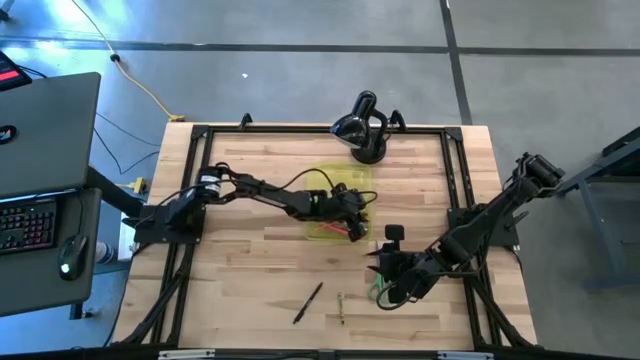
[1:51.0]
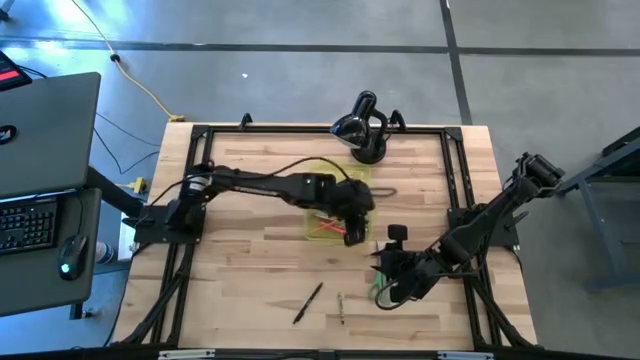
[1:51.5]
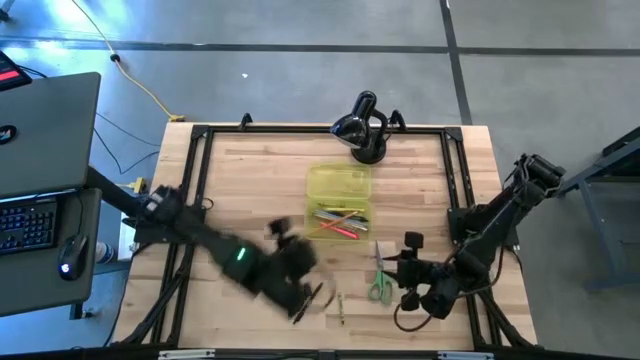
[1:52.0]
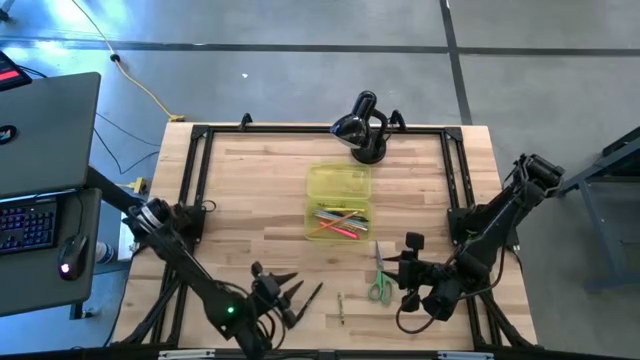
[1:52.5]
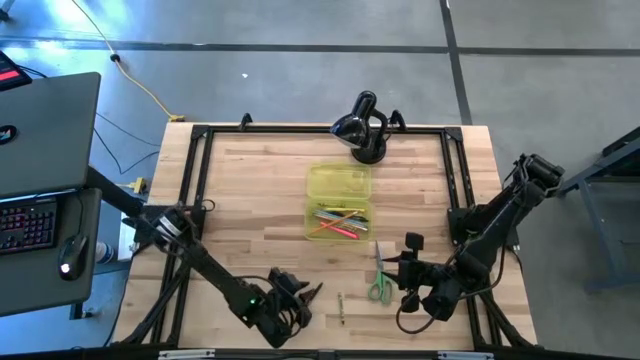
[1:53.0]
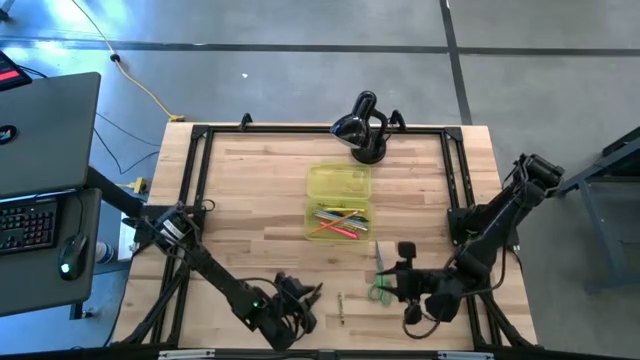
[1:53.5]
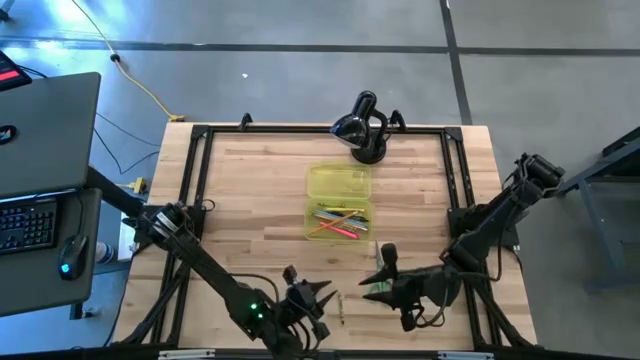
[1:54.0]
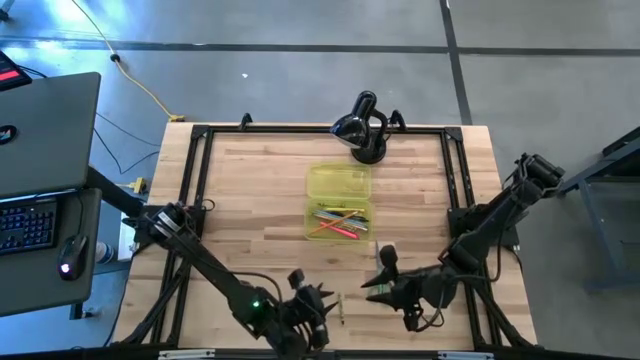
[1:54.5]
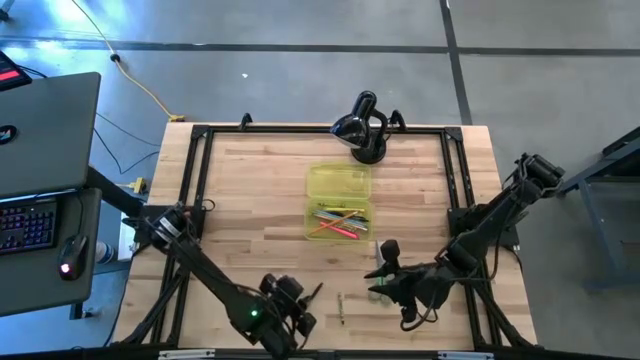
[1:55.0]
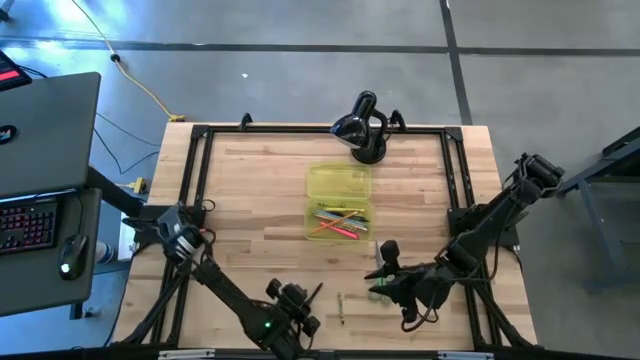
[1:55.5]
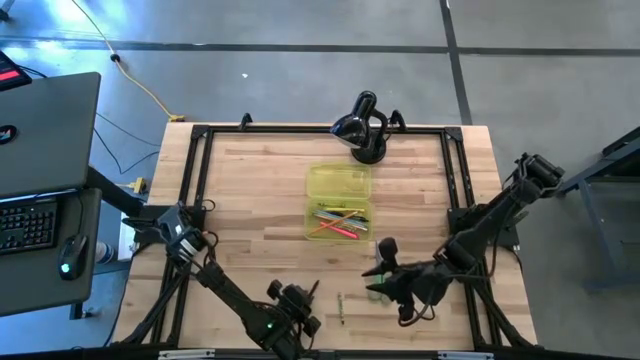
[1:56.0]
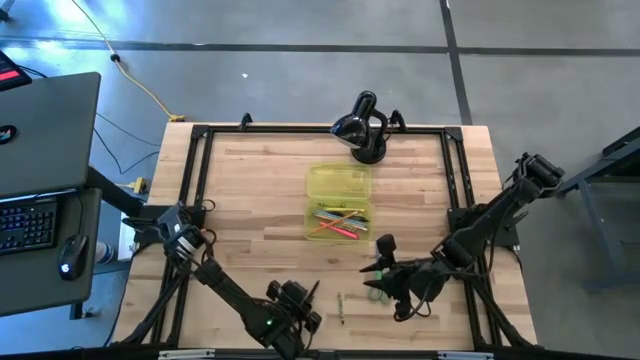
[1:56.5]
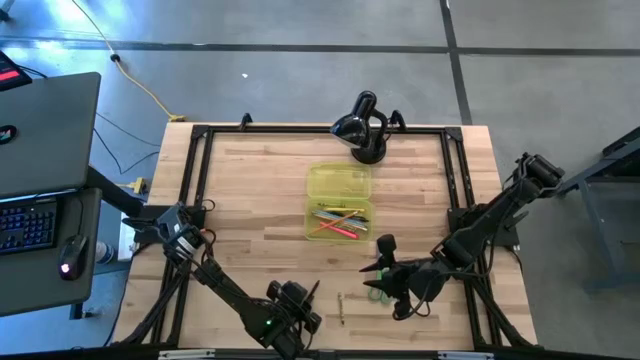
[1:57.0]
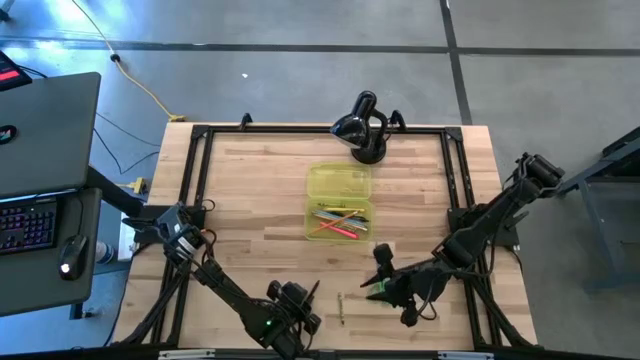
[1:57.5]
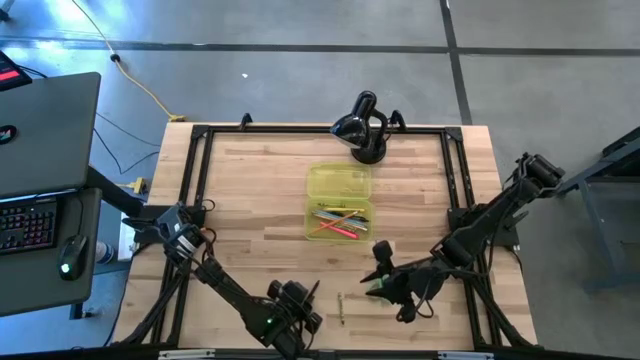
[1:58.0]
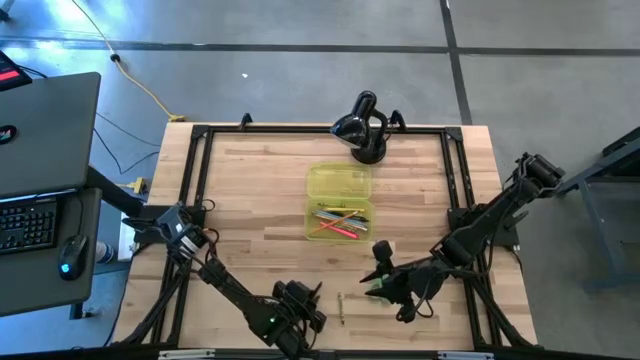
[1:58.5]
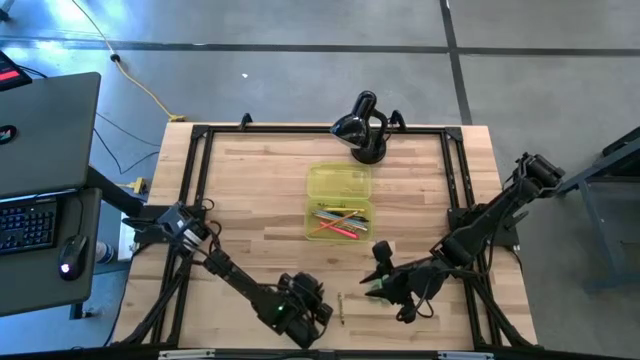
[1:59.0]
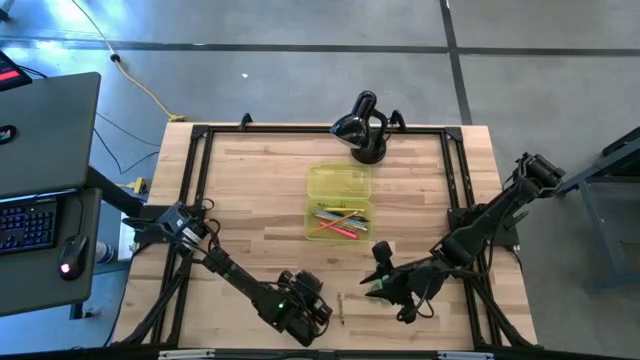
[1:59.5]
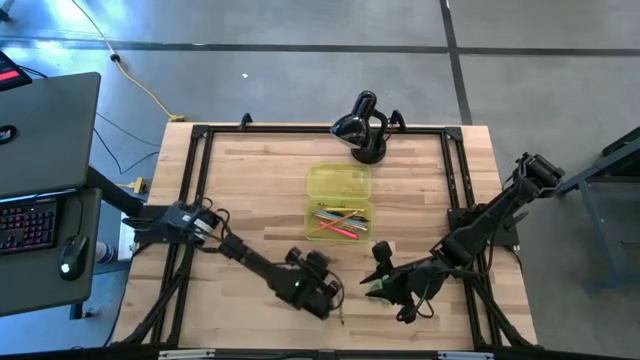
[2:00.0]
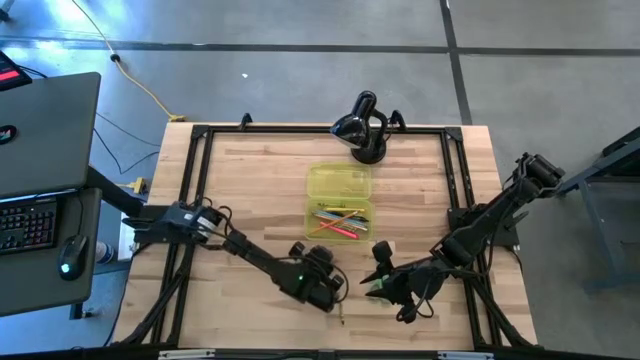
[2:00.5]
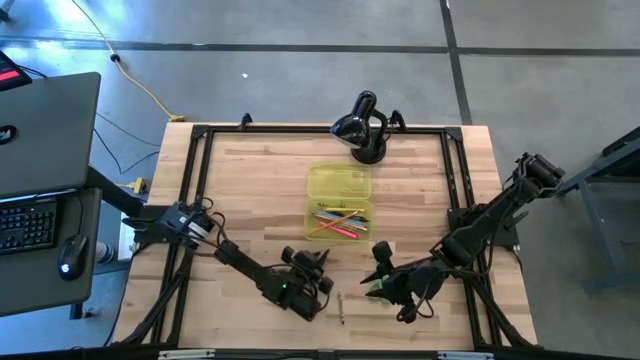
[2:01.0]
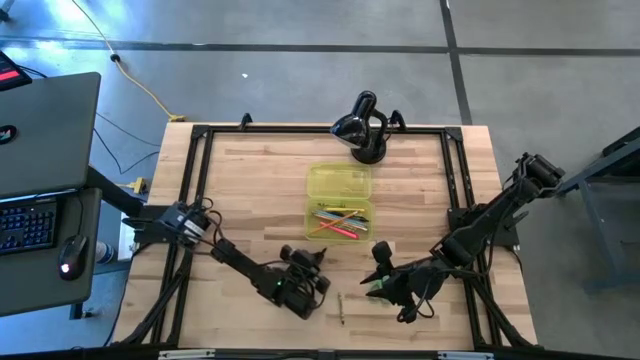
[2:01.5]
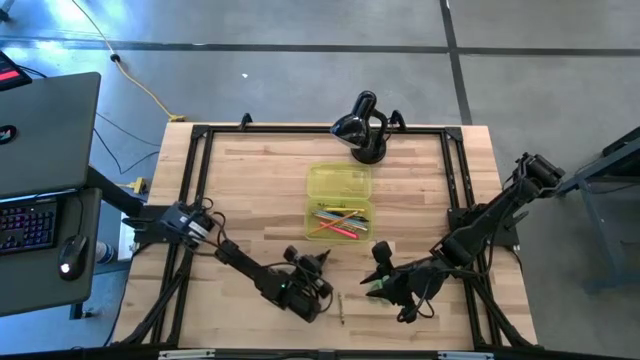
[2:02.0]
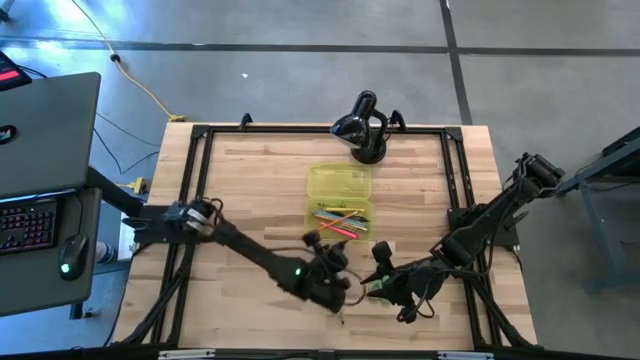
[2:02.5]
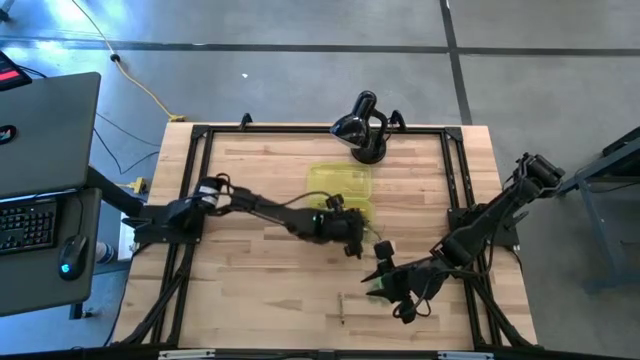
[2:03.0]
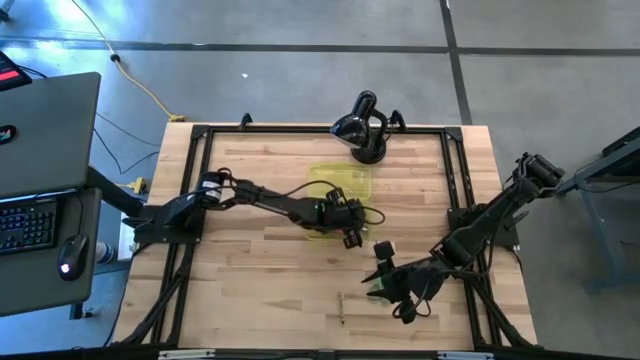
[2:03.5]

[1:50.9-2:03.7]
Task: Pick & place school supplies into a supply box
Put the black pen into the yellow school supply box

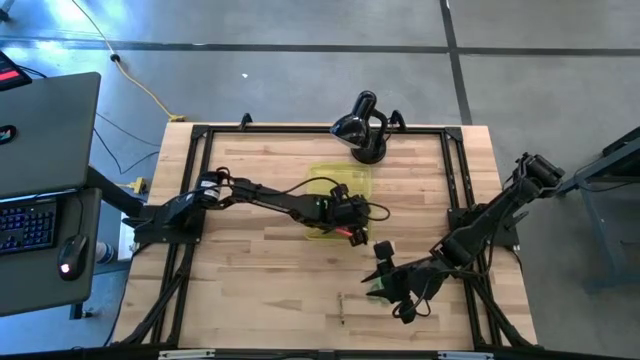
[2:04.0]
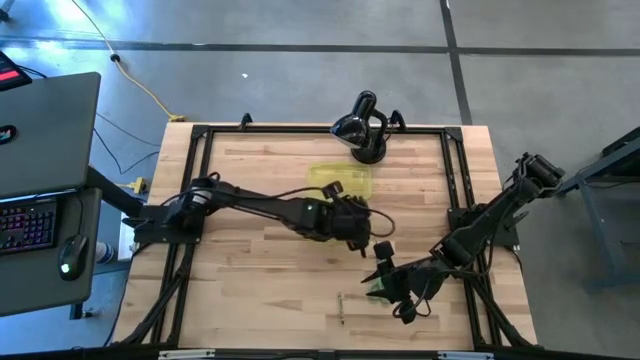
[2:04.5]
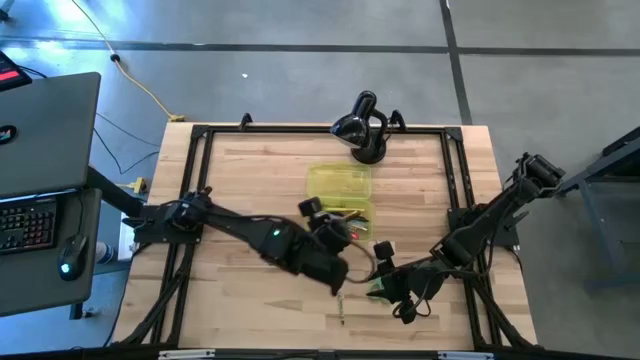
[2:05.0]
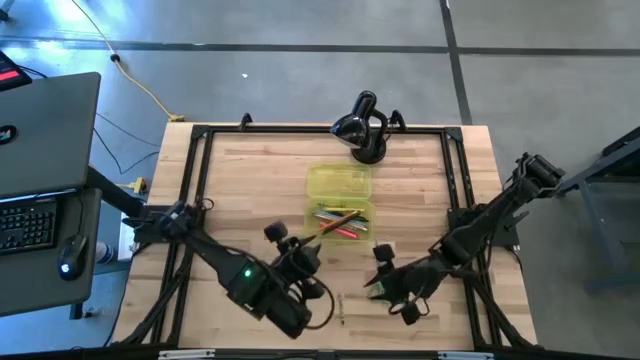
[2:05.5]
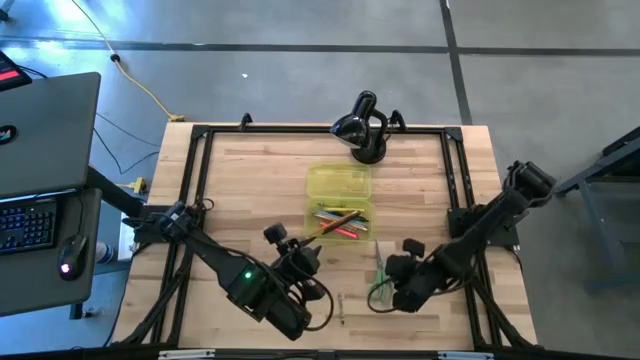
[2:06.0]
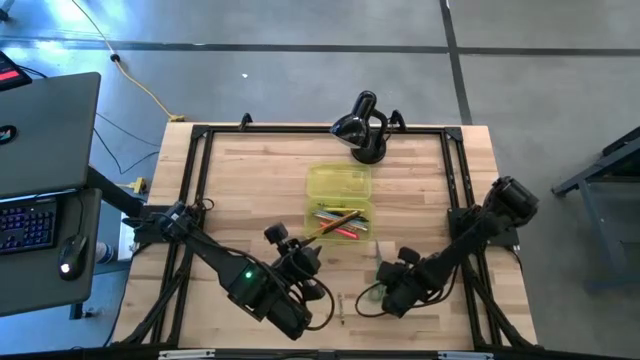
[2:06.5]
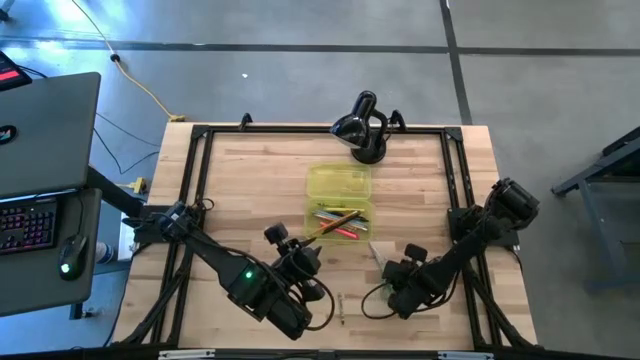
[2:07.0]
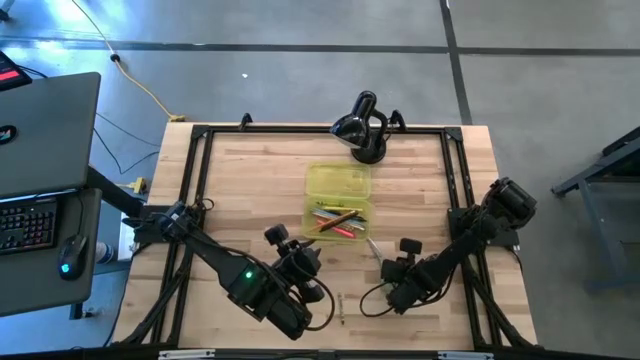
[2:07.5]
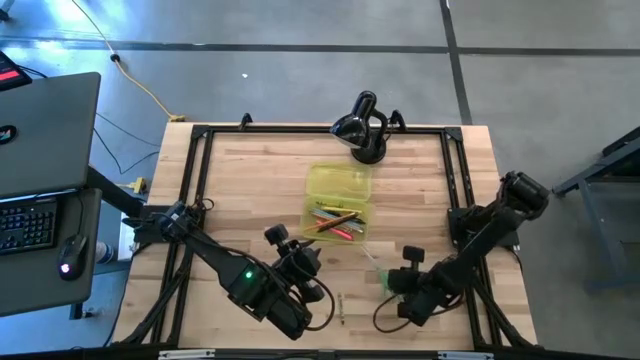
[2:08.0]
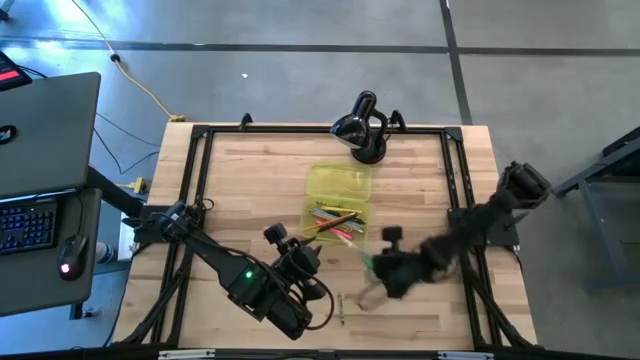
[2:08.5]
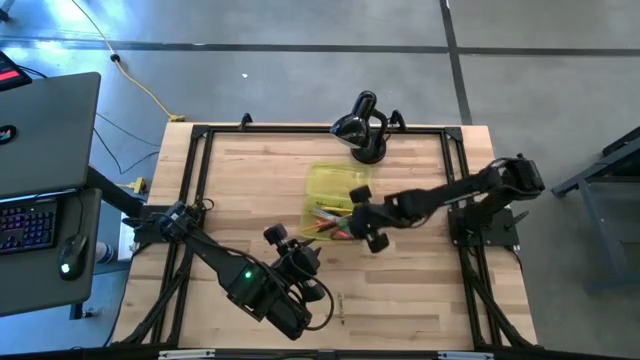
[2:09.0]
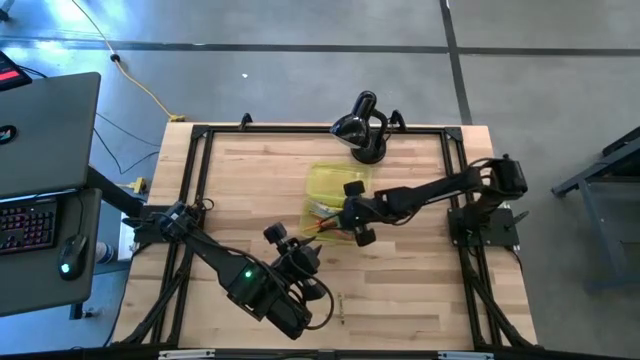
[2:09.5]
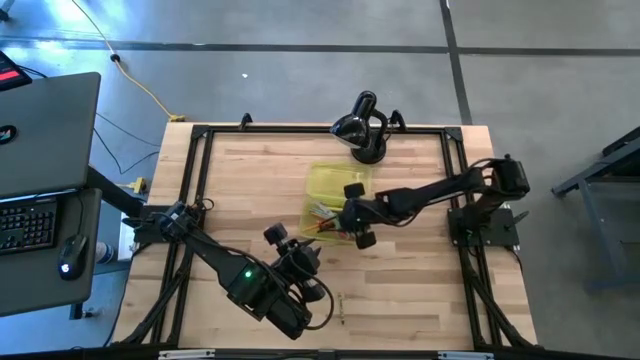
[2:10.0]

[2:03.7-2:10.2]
Put the green scissors into the yellow school supply box
